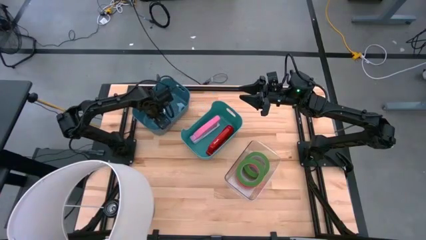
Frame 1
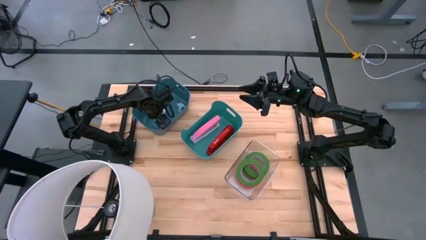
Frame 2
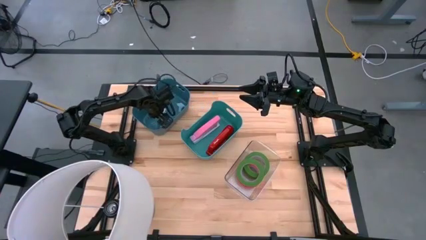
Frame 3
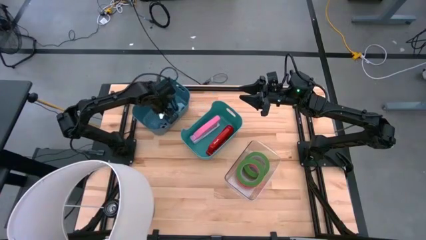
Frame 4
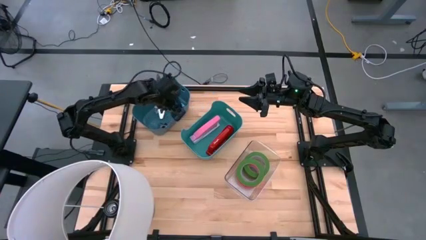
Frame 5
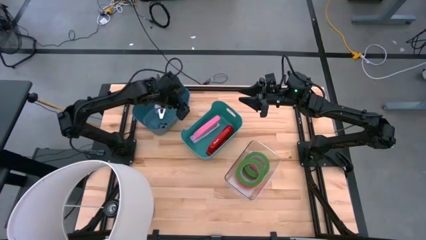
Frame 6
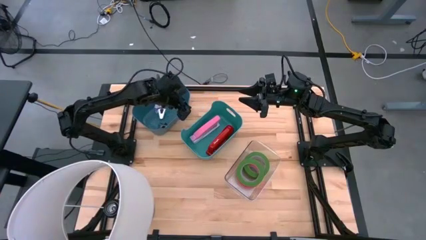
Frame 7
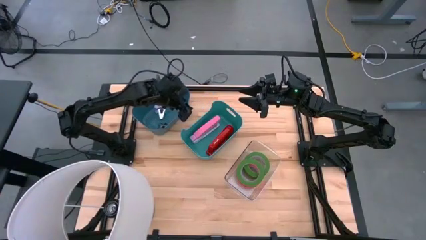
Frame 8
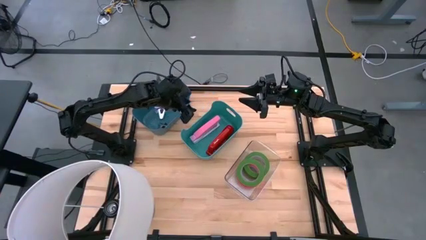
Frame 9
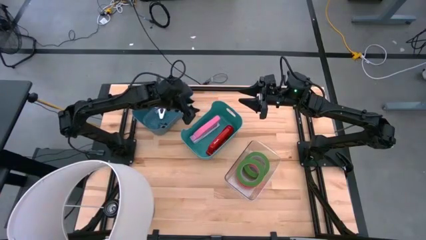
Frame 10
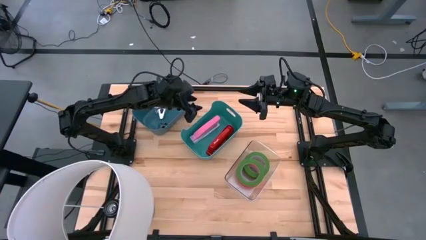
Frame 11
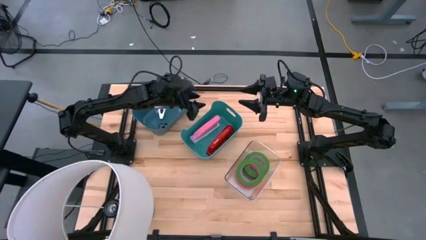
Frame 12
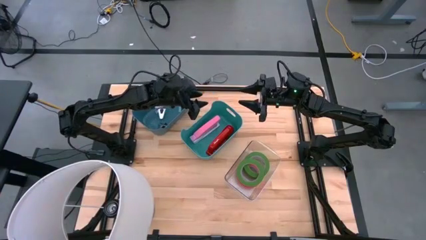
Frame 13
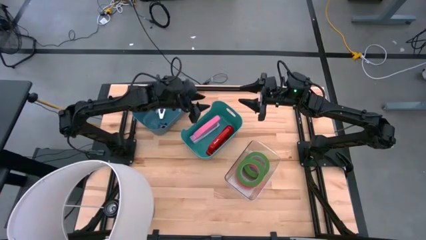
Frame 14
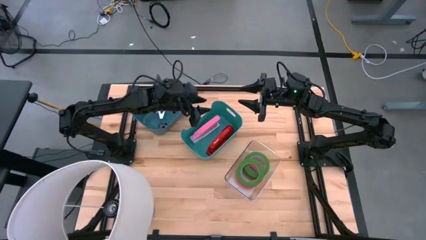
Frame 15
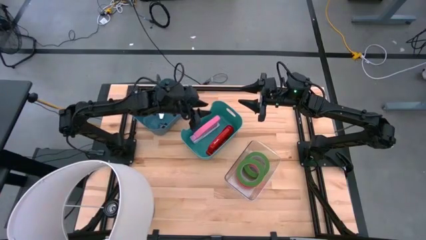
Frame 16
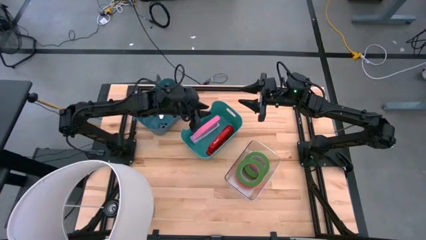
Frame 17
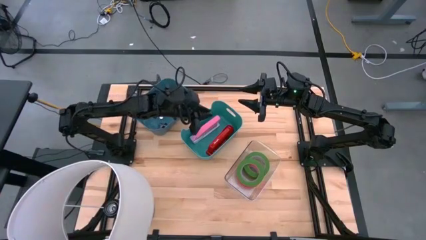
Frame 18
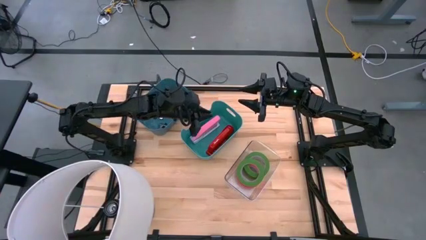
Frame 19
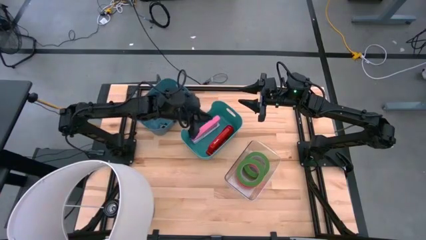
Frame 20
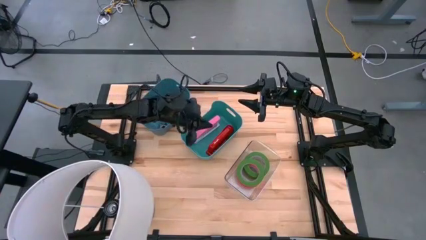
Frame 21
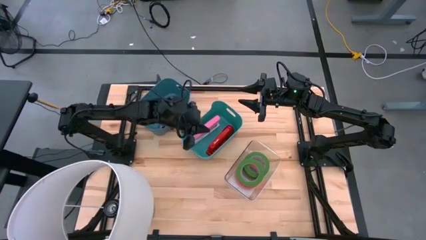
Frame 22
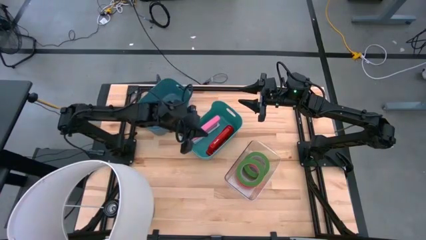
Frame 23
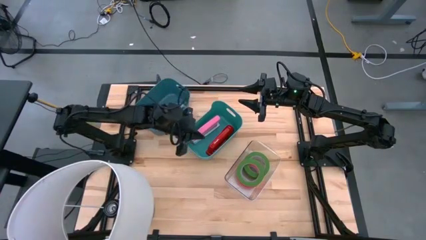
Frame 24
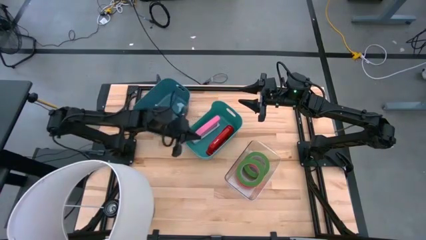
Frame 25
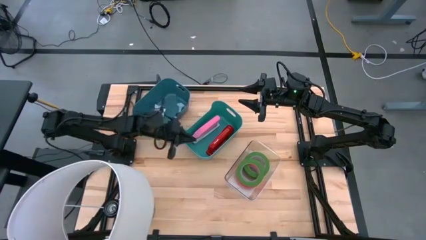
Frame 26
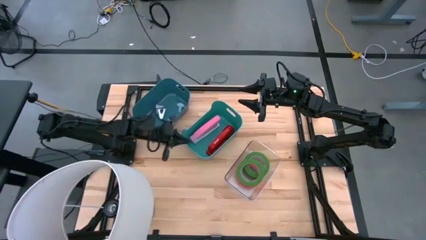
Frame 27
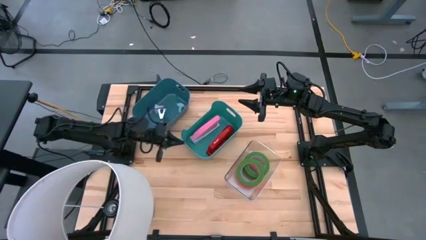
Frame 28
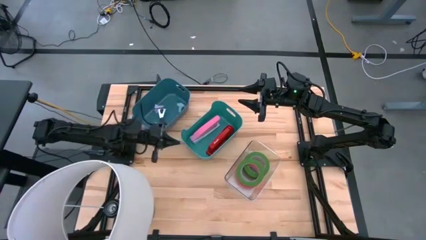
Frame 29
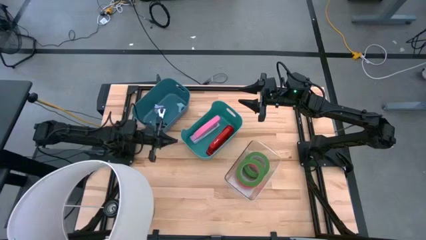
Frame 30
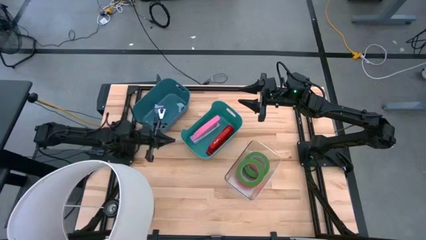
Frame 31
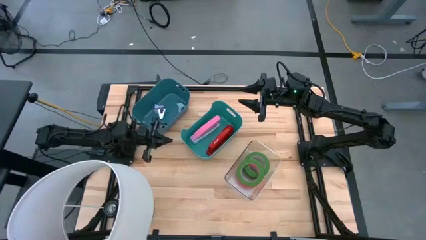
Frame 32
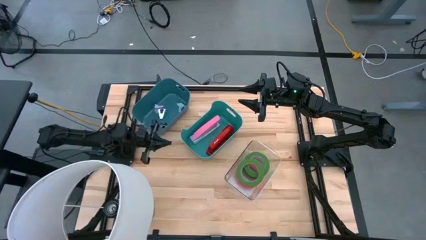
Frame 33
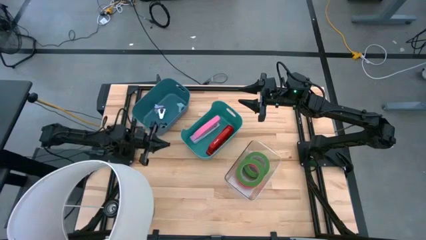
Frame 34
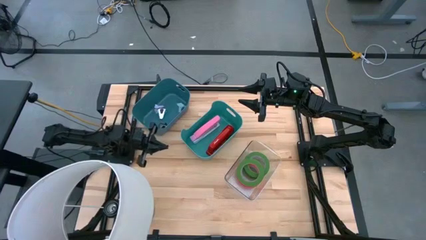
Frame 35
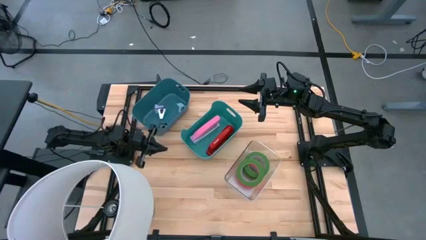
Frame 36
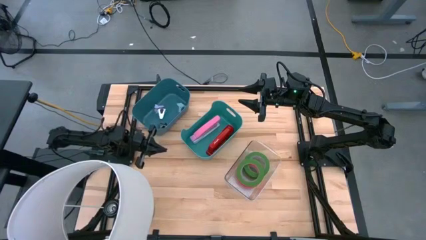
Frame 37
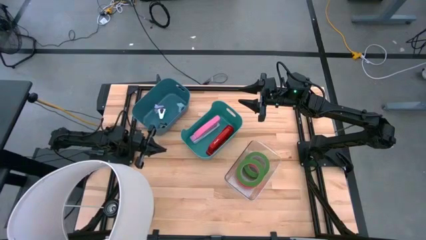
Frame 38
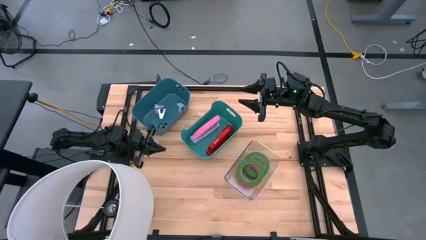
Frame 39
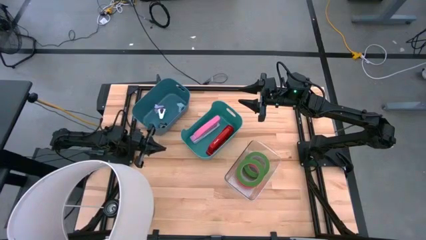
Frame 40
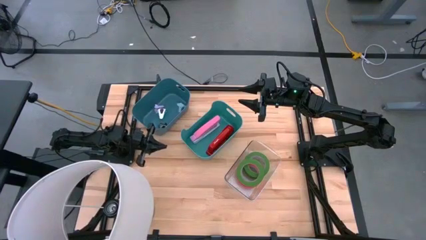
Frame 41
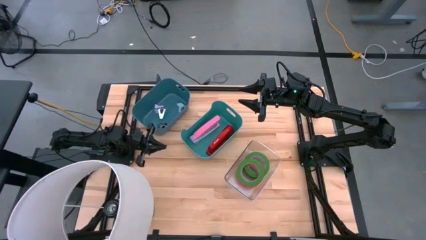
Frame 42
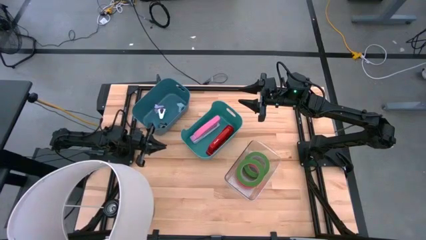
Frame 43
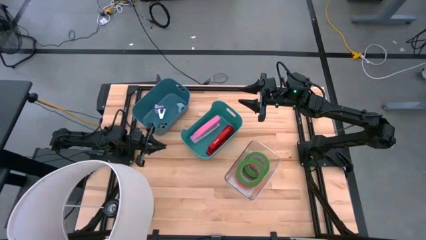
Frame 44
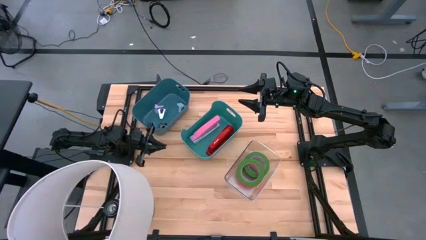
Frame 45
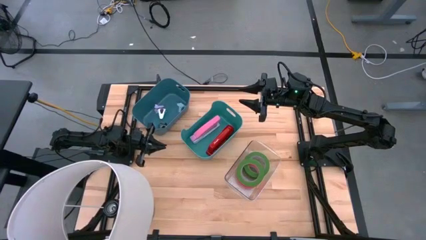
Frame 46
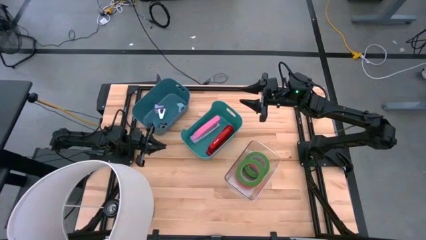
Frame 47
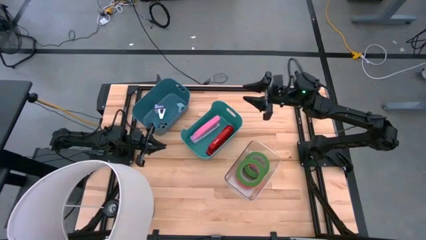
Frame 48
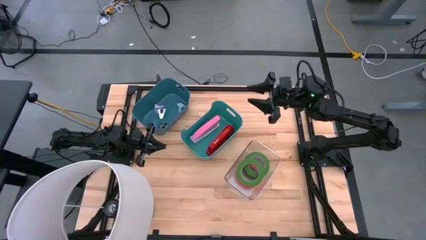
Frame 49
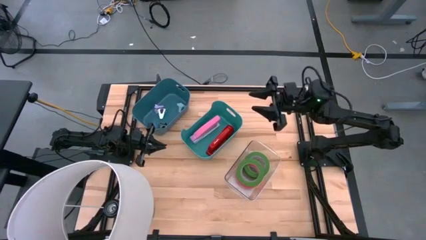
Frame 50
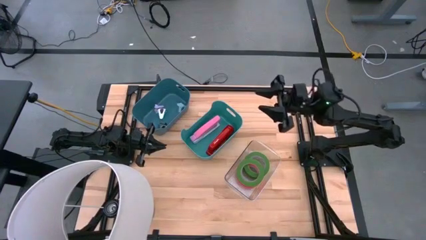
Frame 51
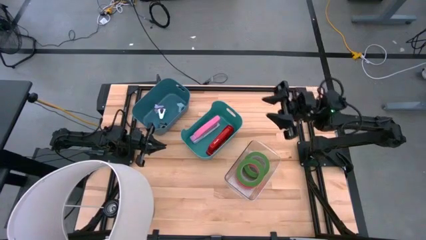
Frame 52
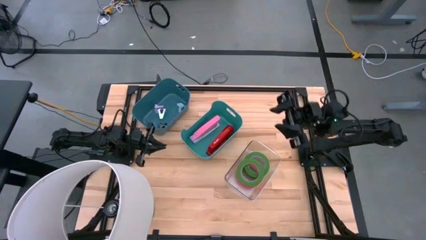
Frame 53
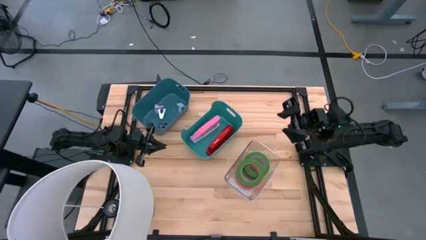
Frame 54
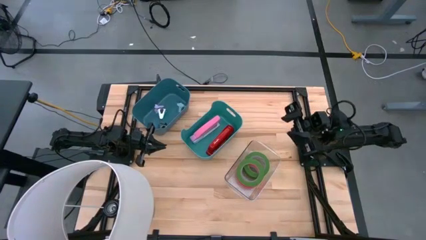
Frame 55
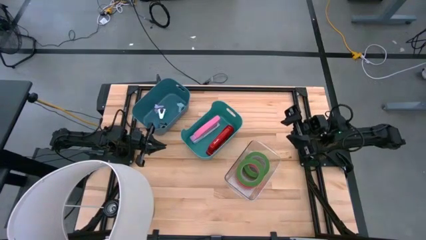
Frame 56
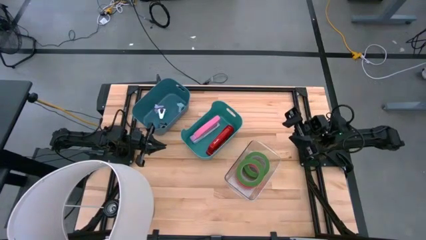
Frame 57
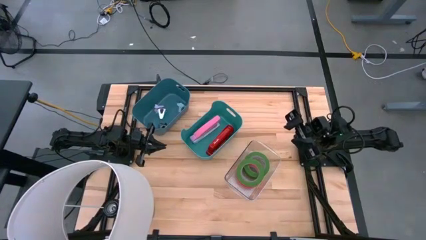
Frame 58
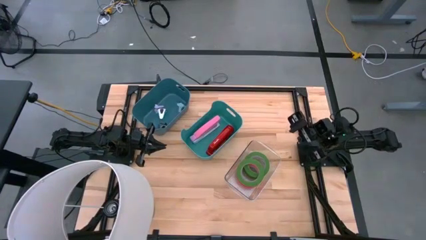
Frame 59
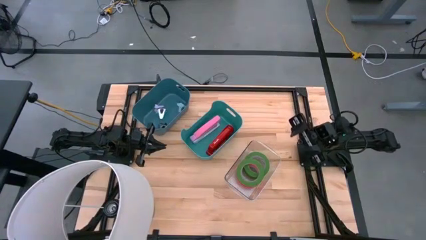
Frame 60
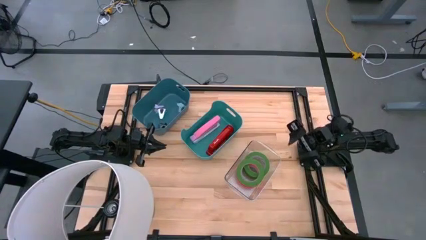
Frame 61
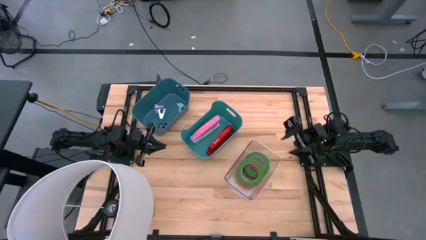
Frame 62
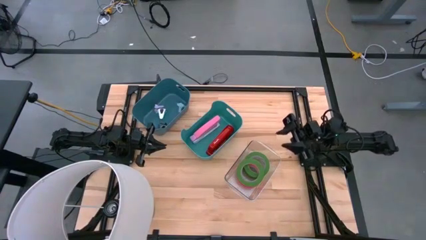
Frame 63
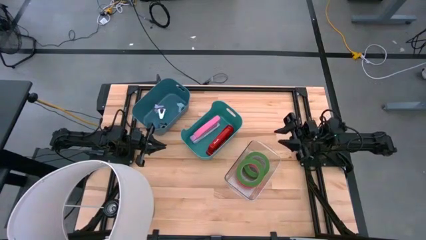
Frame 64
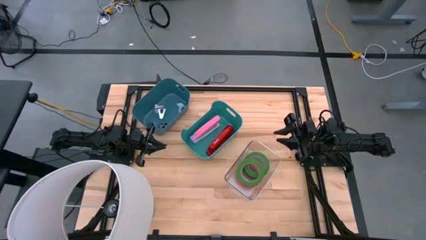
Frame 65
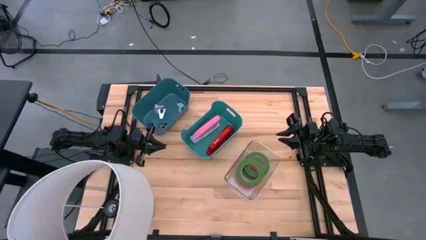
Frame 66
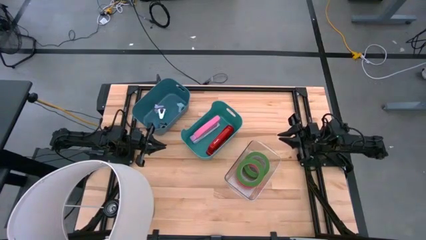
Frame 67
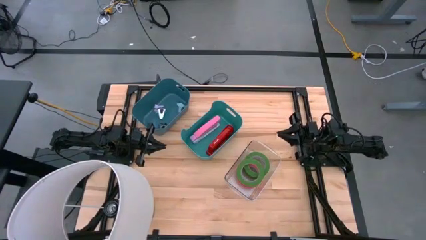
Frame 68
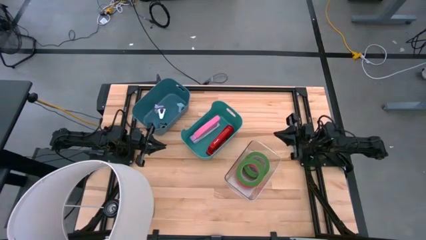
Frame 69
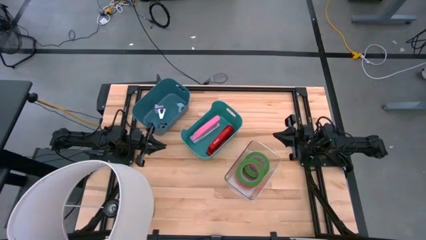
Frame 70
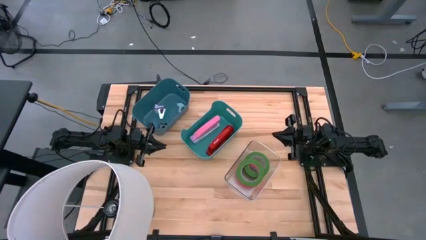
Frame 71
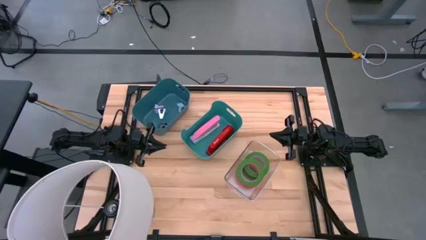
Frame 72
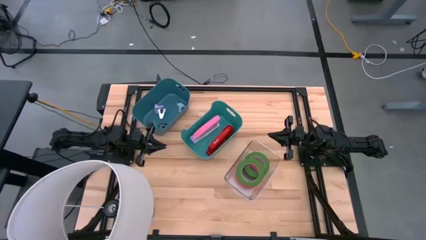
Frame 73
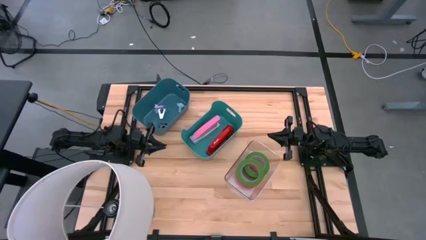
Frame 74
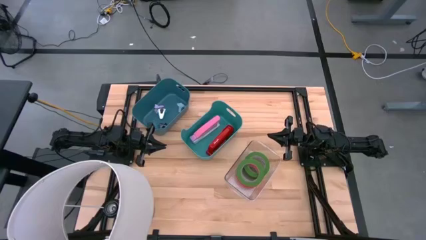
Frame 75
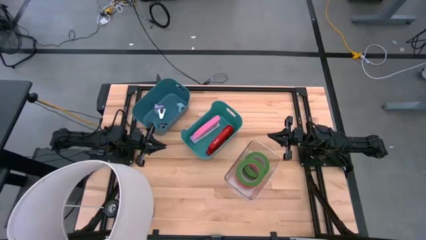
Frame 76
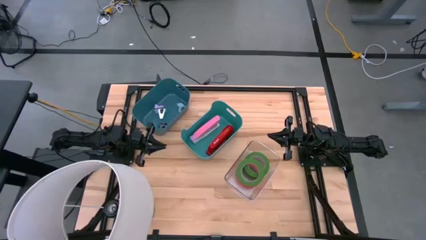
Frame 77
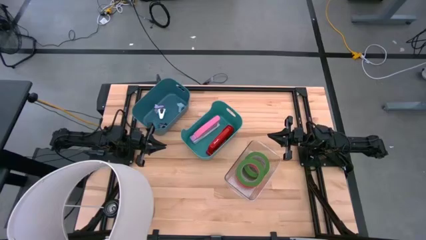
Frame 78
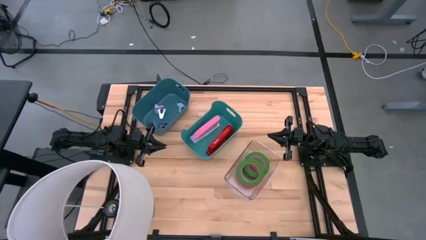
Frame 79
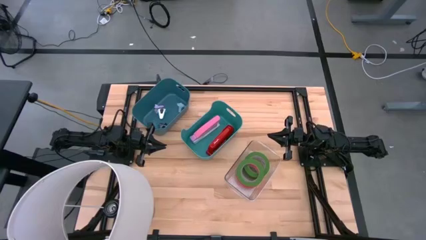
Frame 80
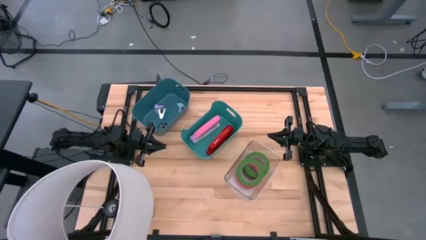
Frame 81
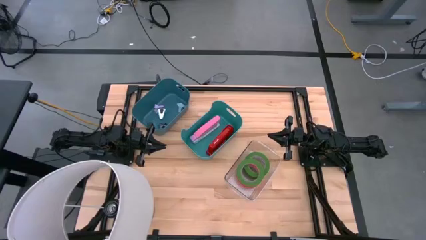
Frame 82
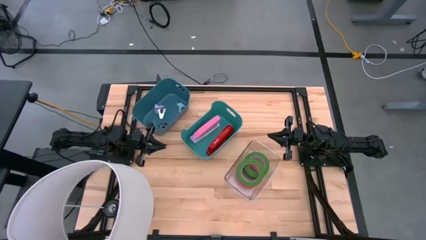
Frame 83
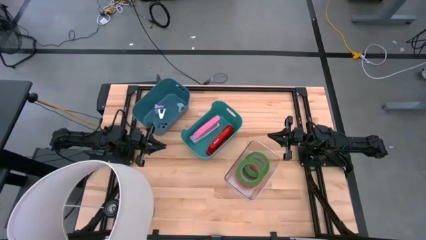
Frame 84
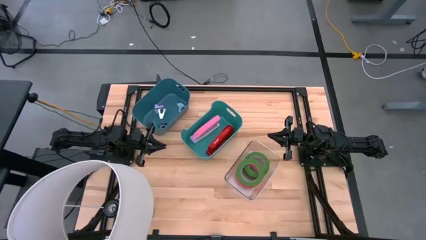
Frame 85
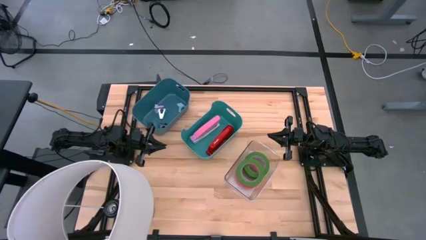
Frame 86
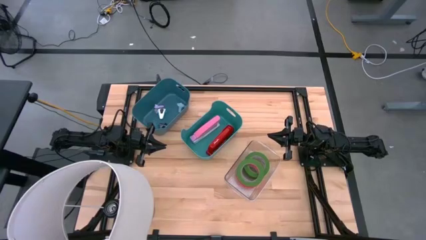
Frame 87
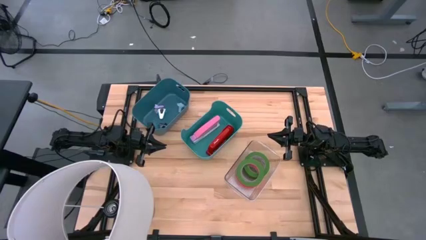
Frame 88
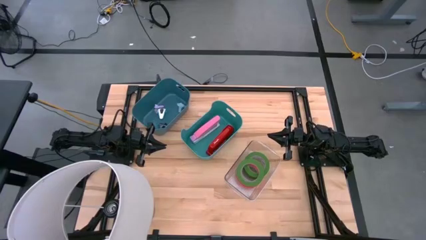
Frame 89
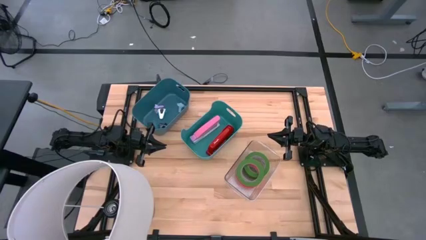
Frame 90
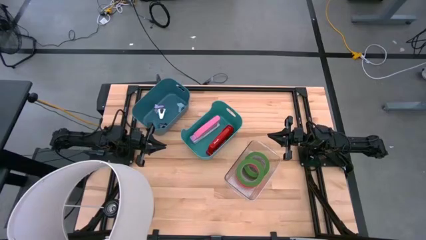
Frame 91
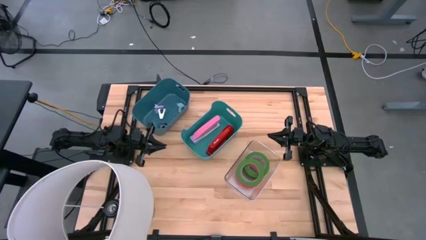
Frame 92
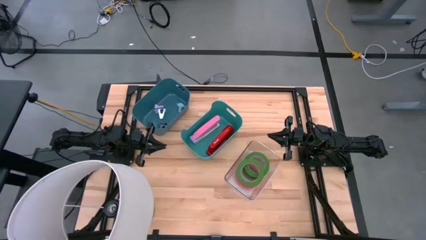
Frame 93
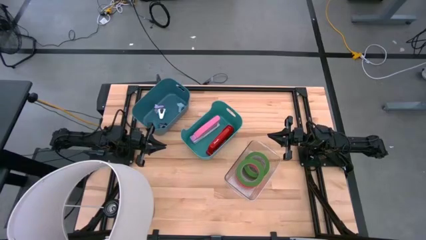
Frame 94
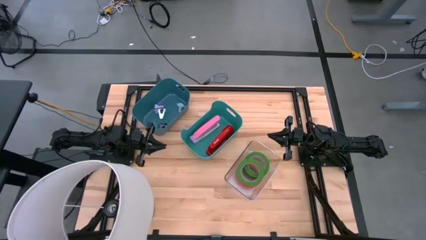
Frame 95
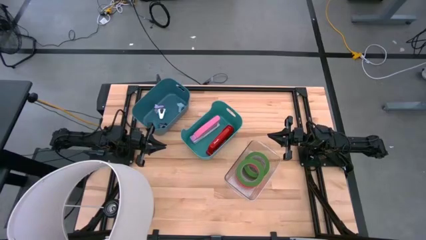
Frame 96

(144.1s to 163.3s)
Task: Pick and place Stapler, Stapler remover, tape
Return to Home Position
